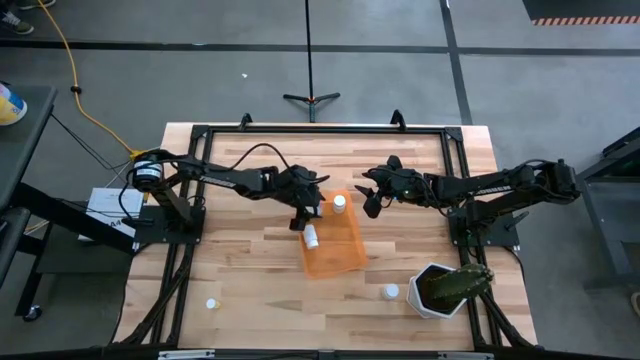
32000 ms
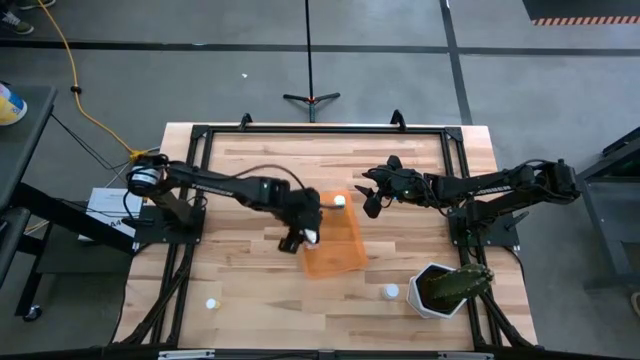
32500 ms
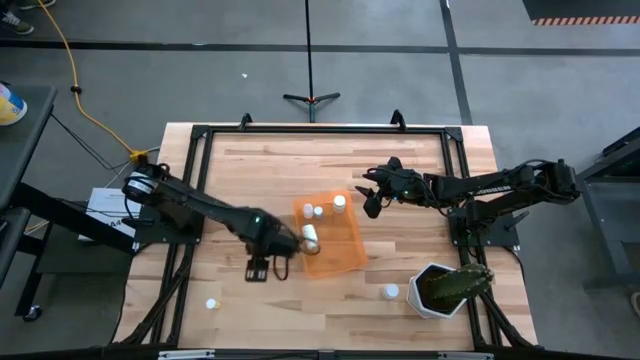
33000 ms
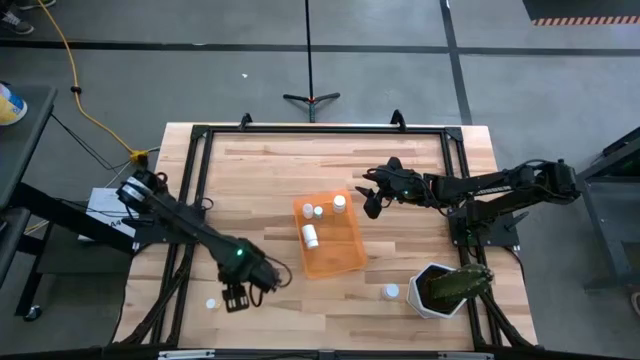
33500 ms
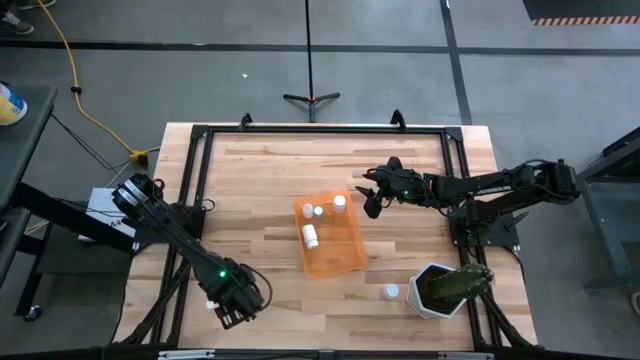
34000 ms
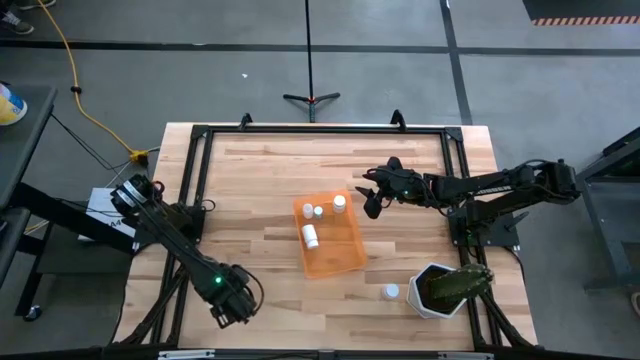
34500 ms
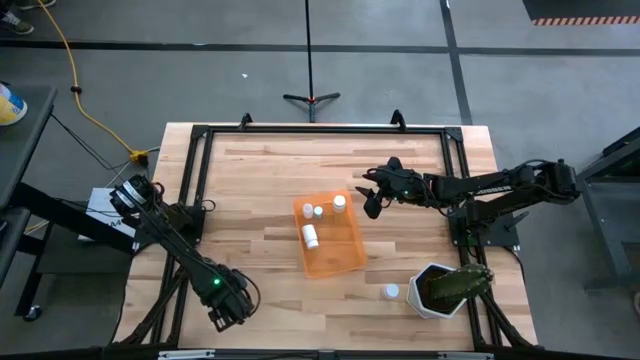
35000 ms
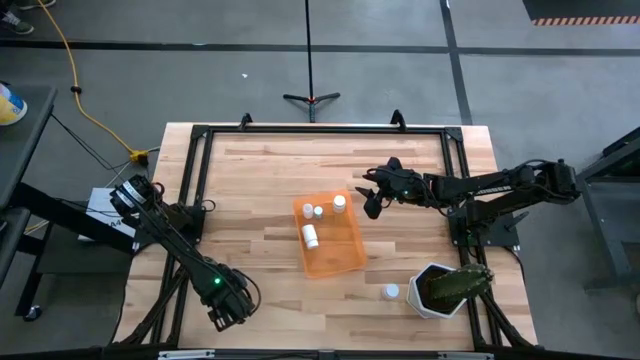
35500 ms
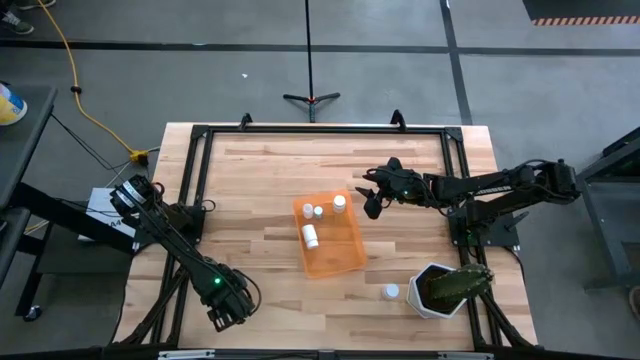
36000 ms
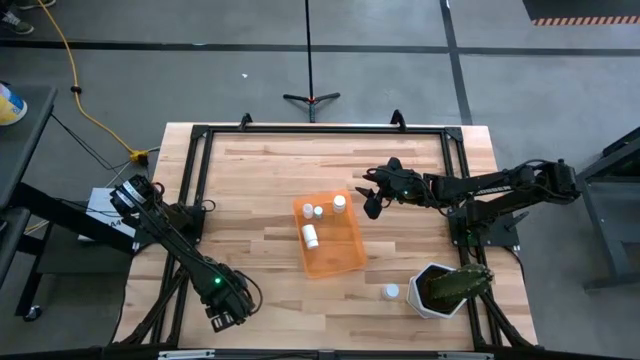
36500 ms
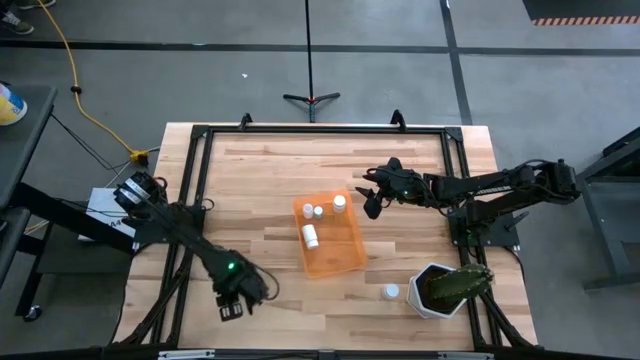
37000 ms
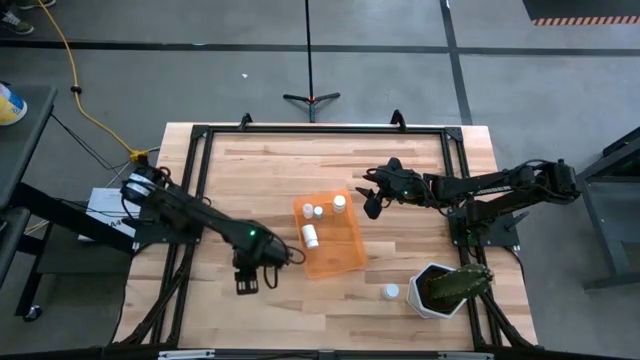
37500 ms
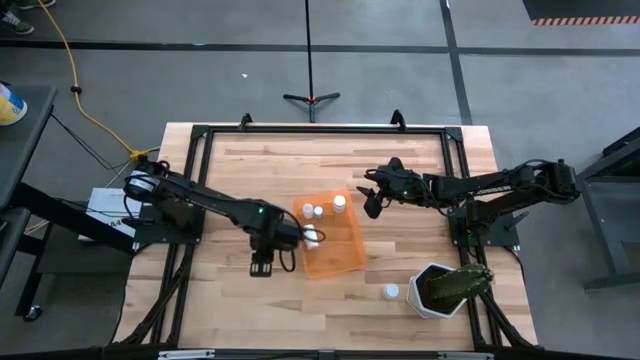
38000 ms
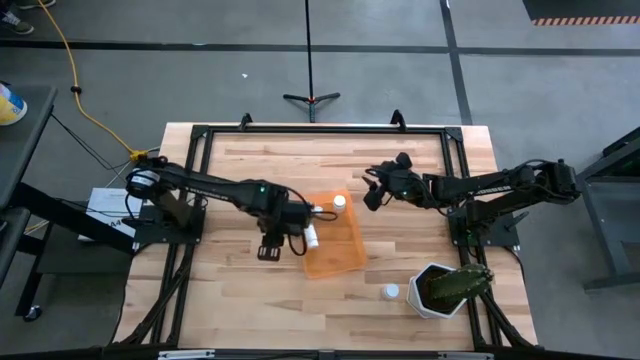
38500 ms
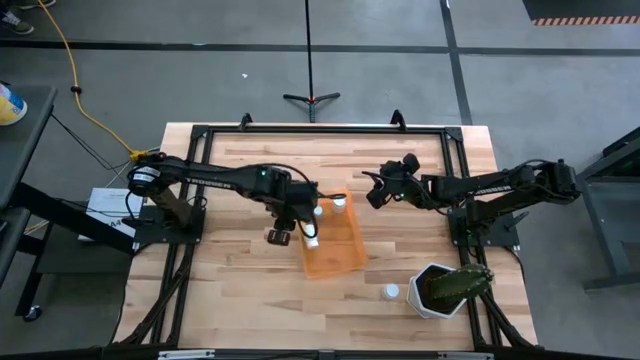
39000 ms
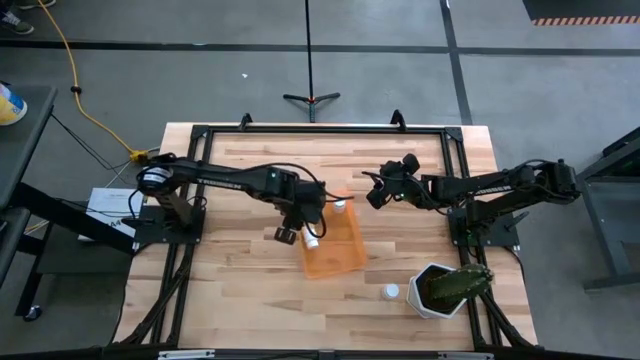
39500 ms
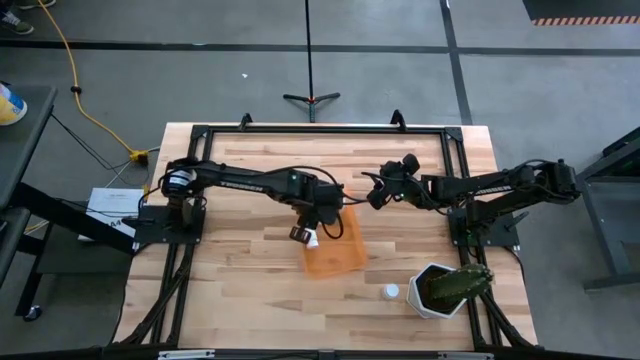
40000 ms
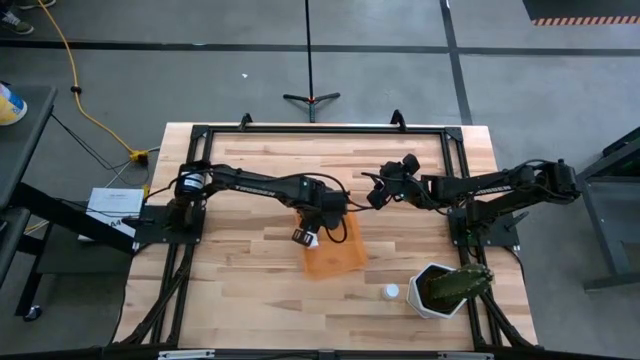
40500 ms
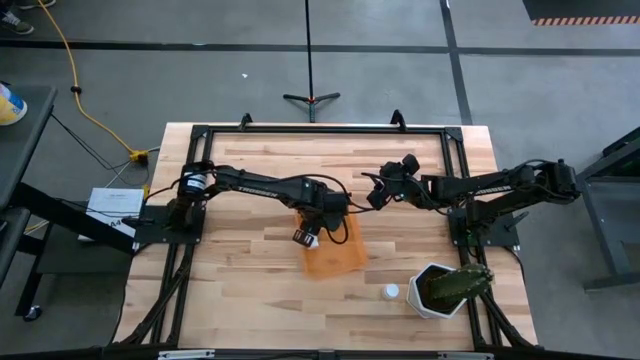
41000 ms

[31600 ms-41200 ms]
Task: Pick and place pill bottles into a basket
Put the yellow pill bottle into the bin

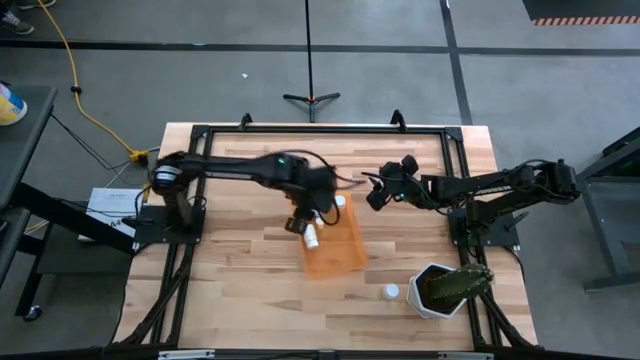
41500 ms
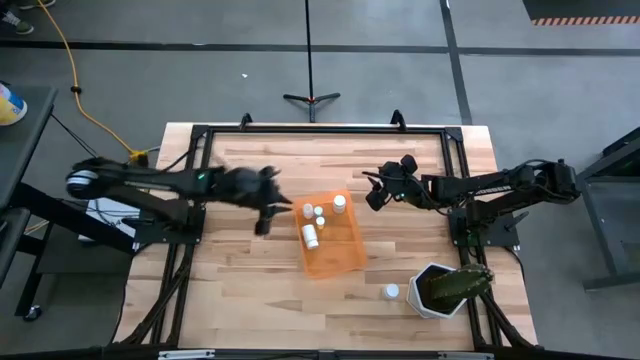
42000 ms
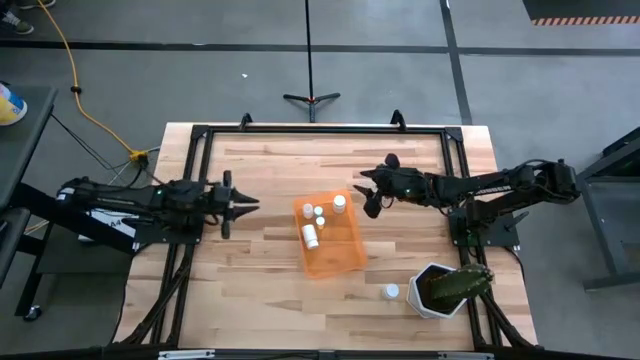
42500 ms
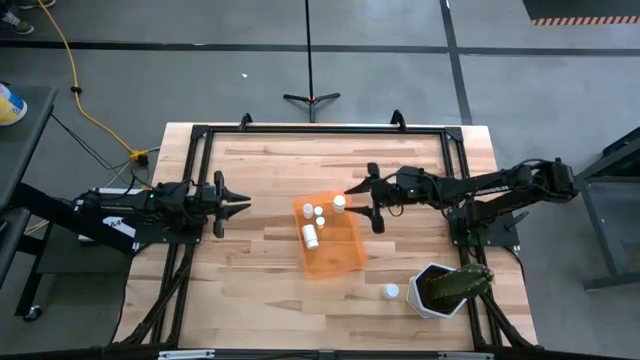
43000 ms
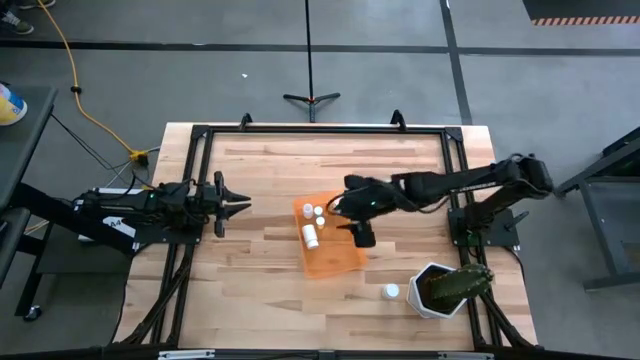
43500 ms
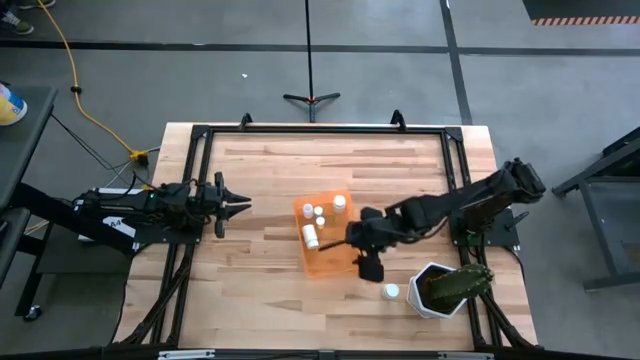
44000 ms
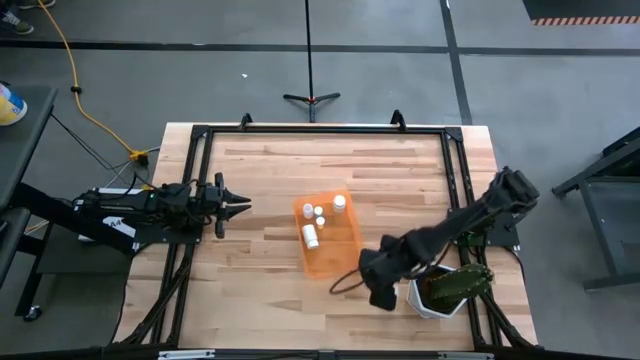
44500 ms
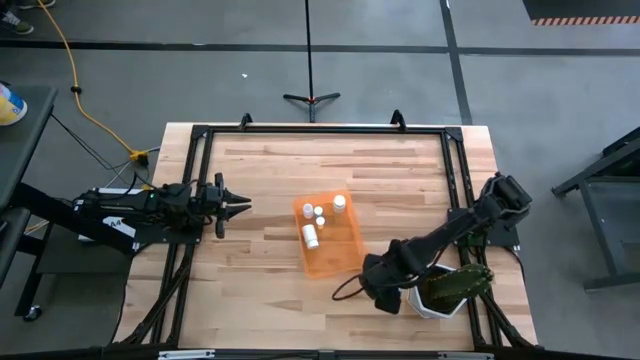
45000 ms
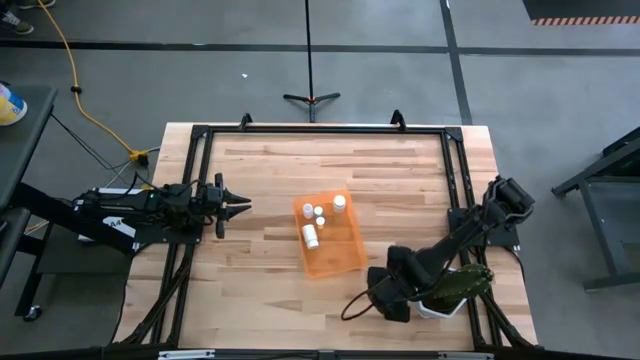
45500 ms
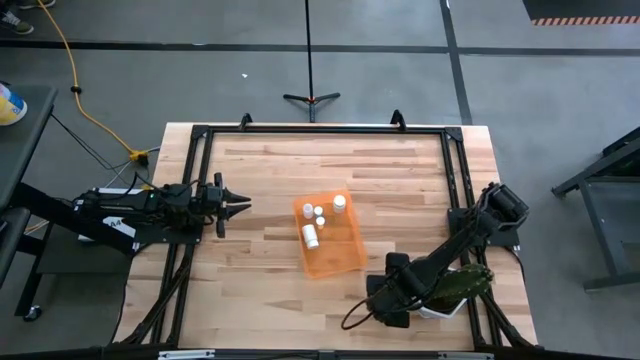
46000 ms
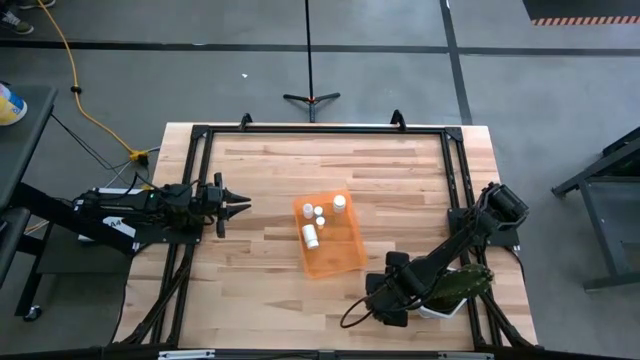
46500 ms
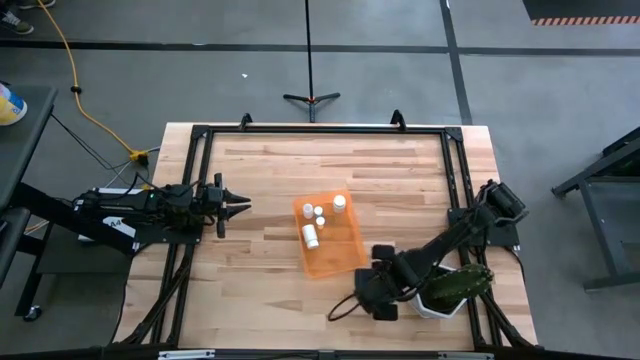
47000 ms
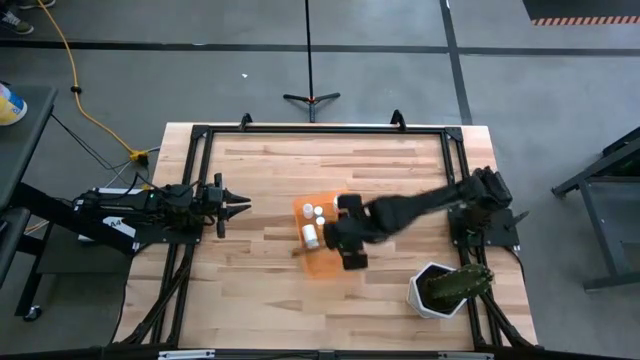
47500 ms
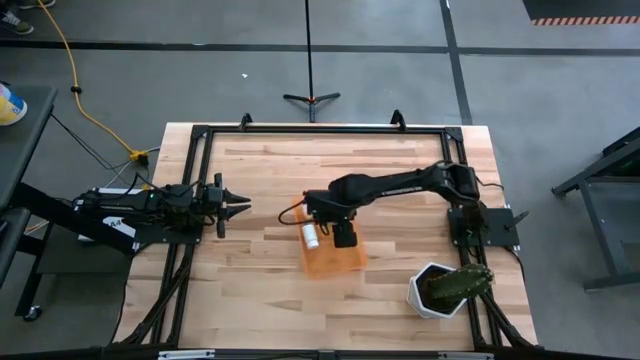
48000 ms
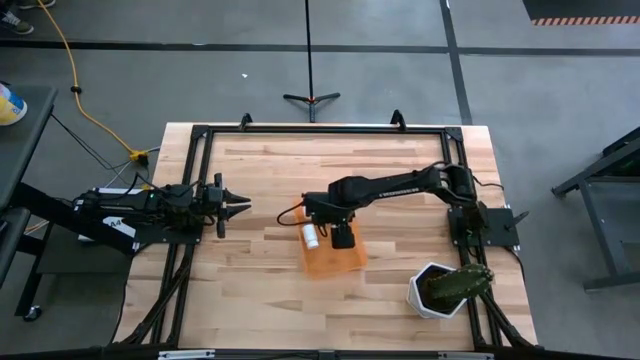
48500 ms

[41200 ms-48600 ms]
Put the large white pill bottle into the bin

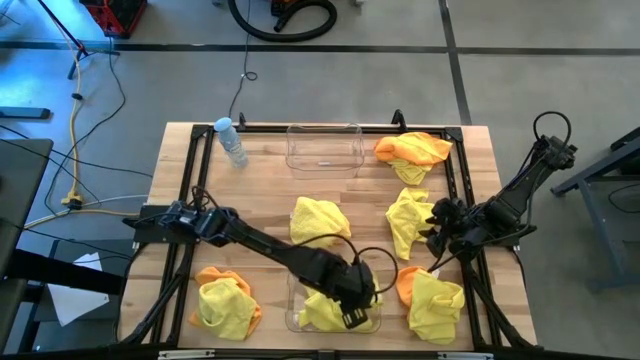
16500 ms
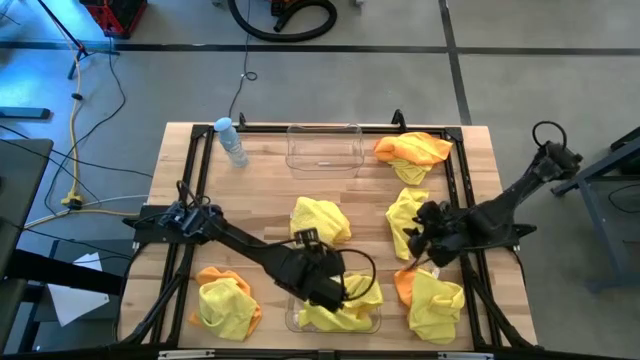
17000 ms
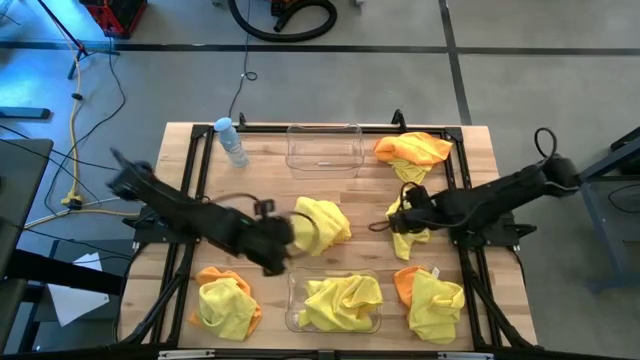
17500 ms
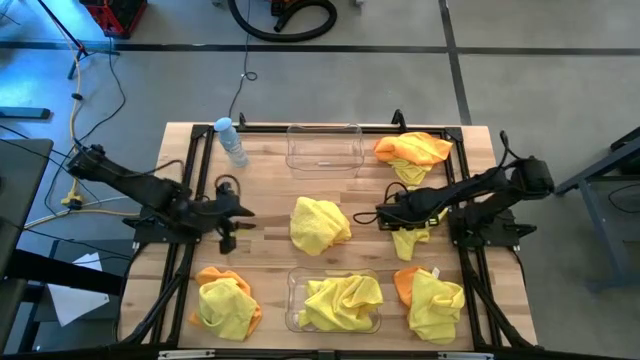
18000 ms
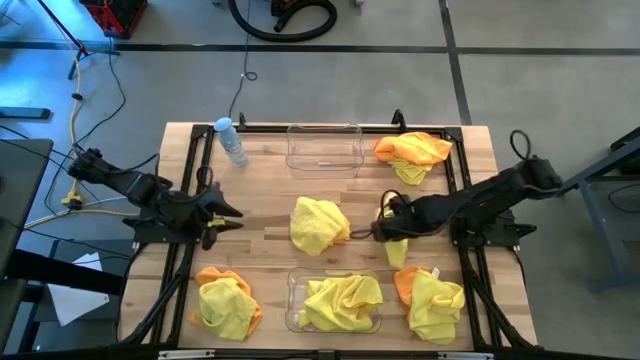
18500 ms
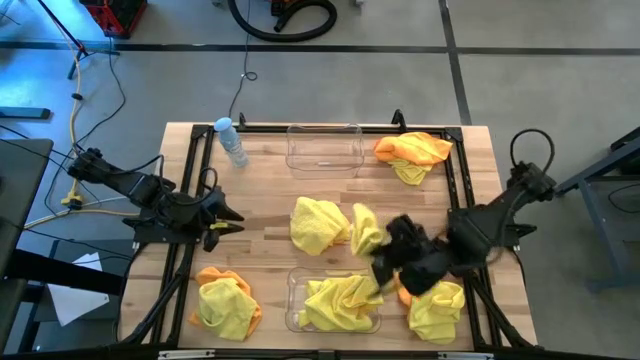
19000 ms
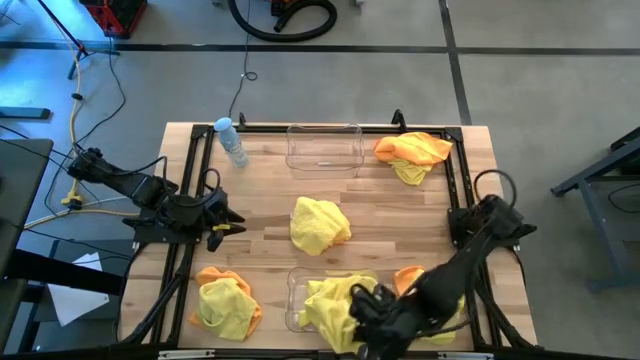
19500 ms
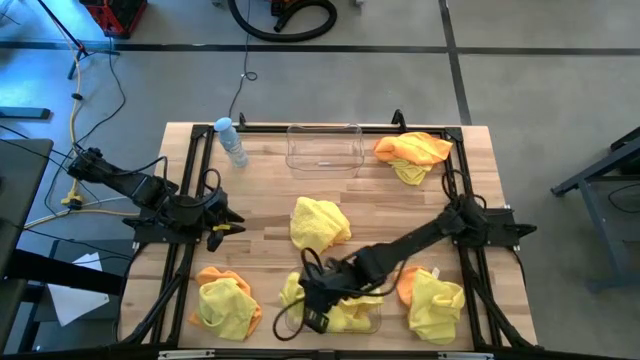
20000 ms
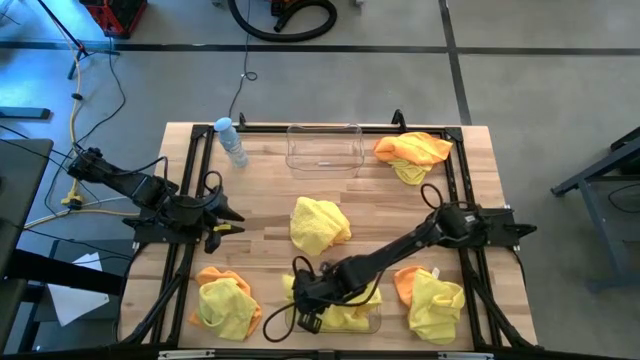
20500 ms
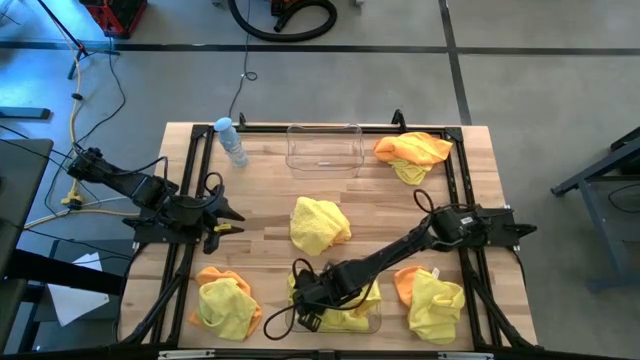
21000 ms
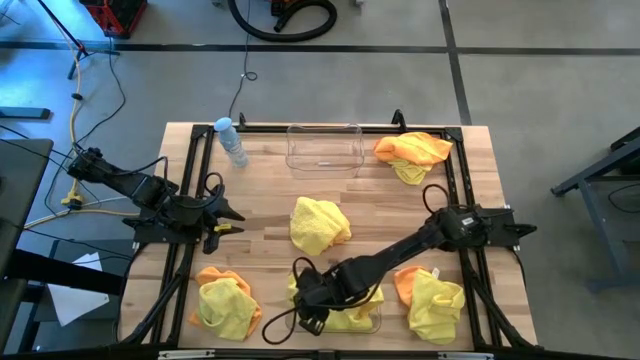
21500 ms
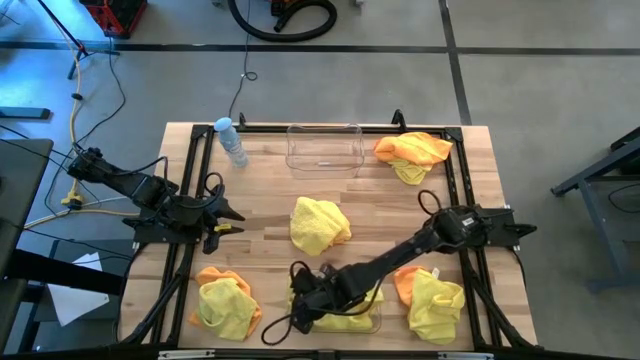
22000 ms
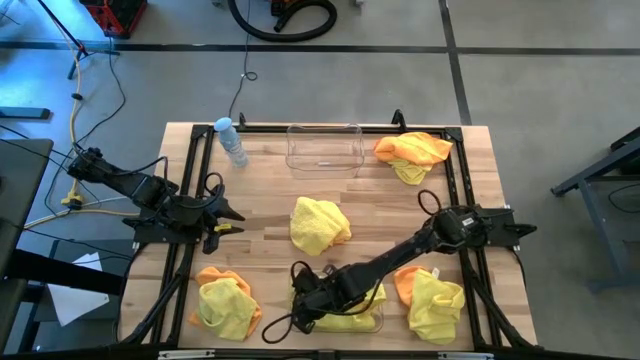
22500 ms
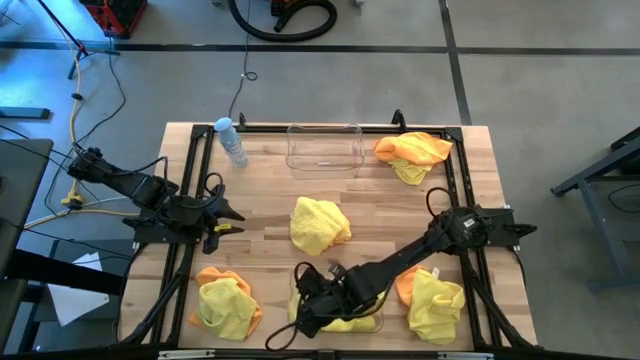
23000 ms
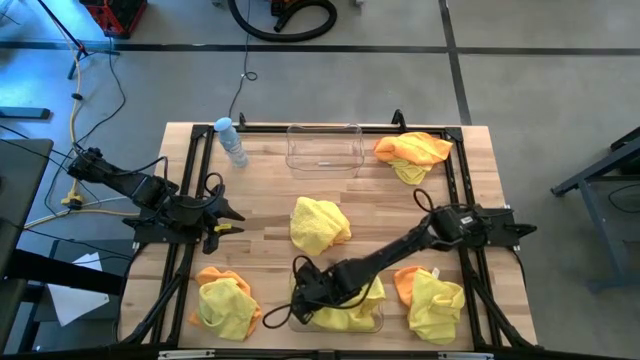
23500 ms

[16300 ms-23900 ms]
Task: Sort microfiber towel by color & place in baskets
Put the yellow microfiber towel into the bottom transparent bin
